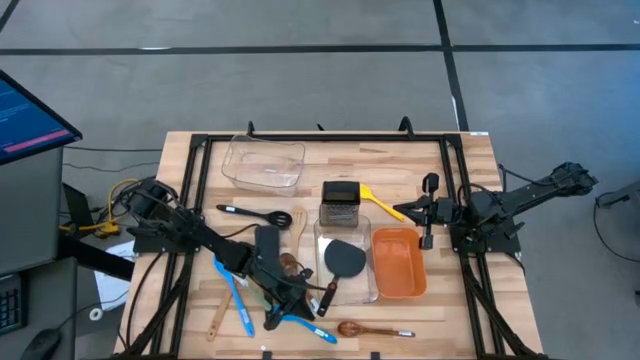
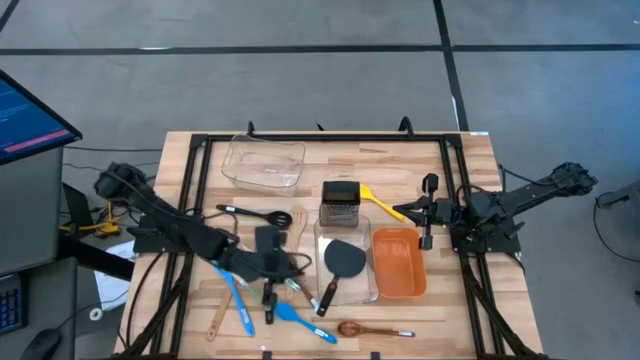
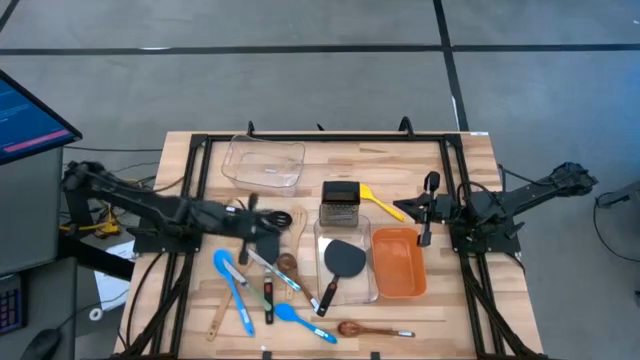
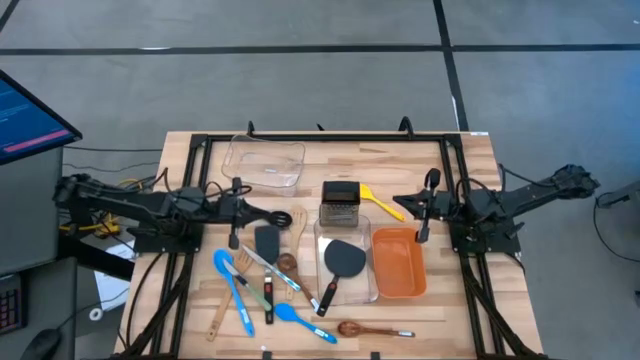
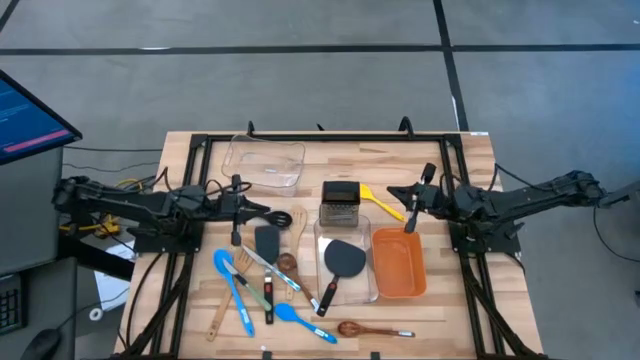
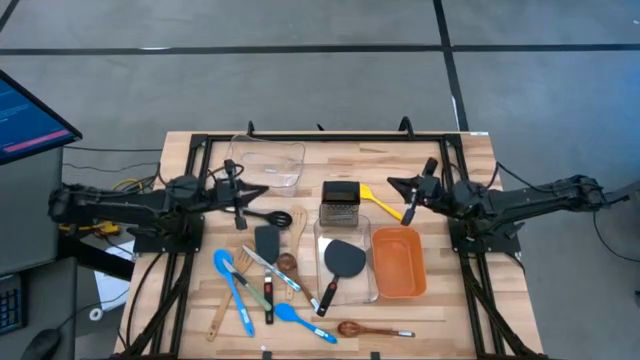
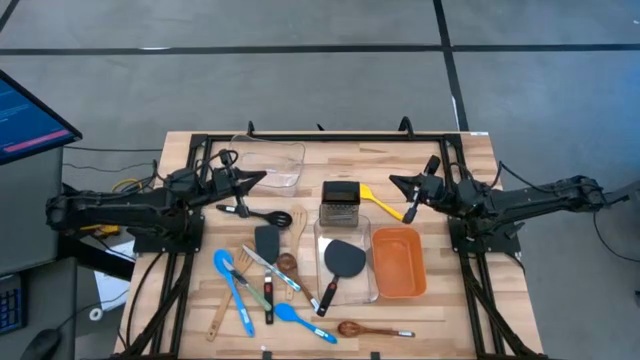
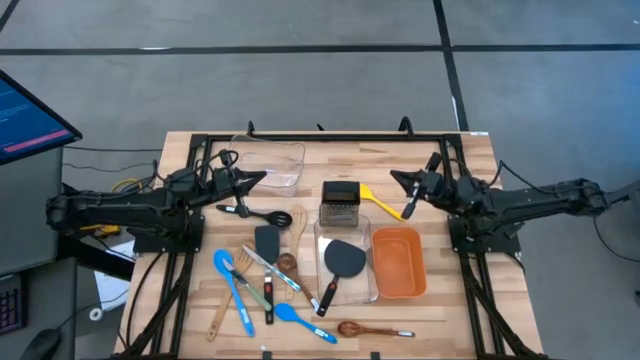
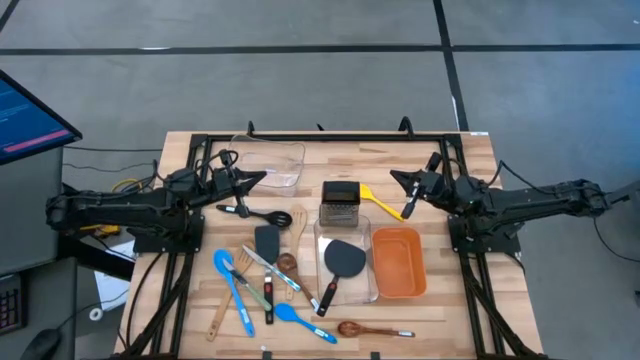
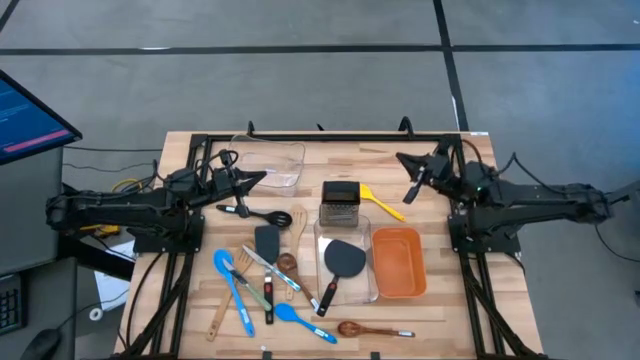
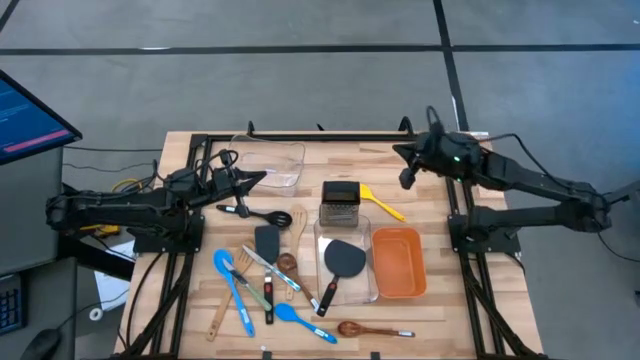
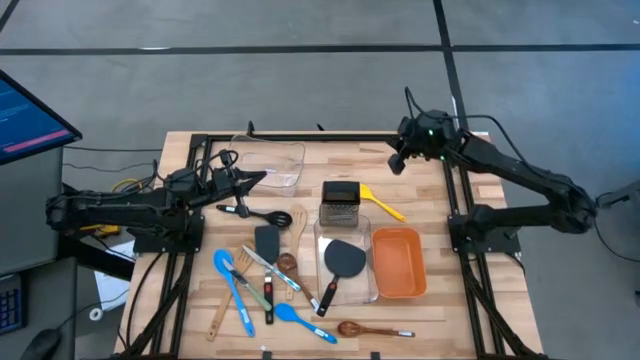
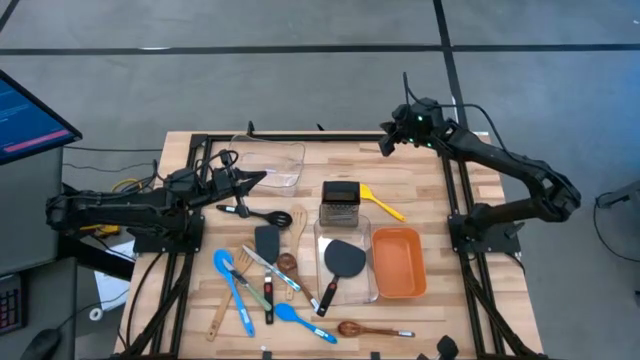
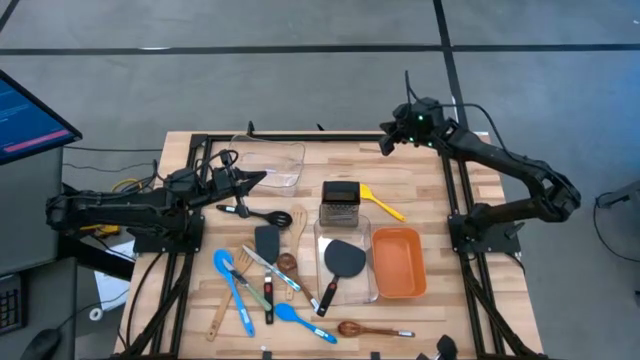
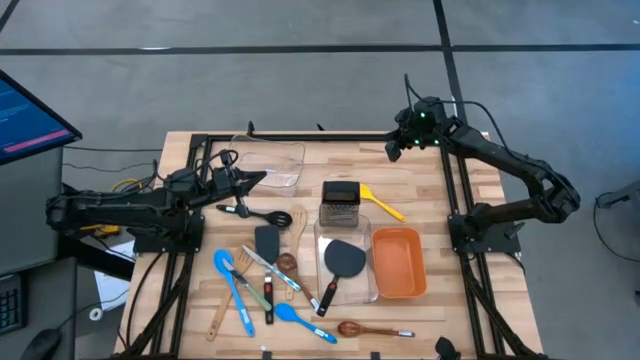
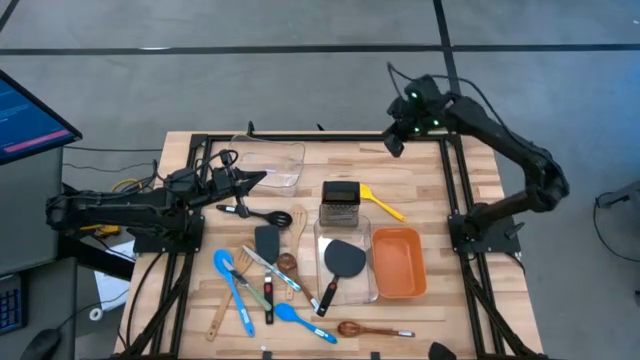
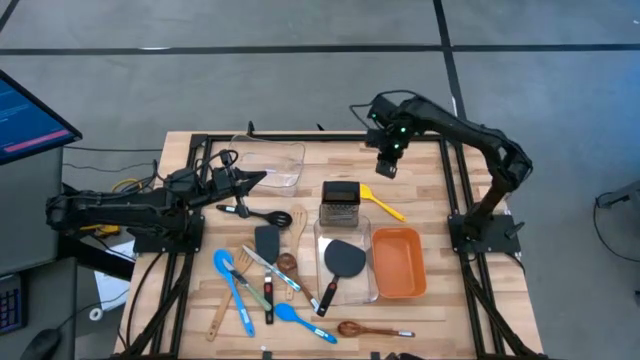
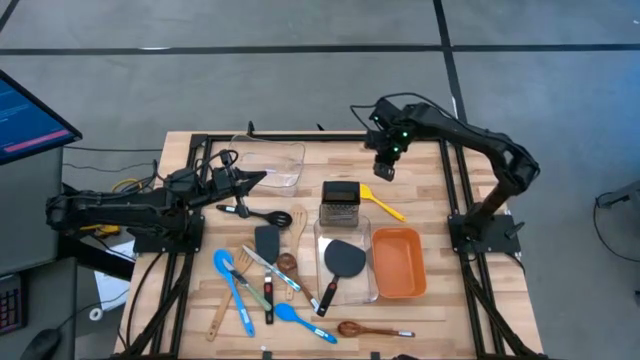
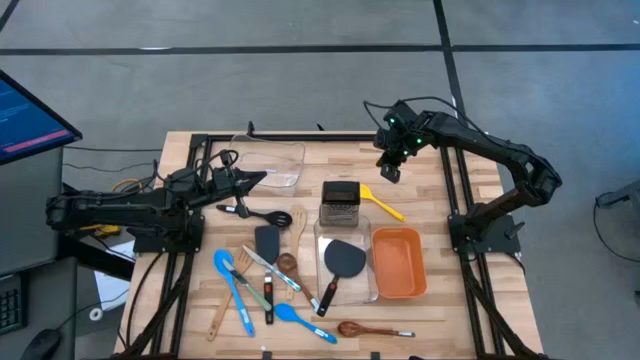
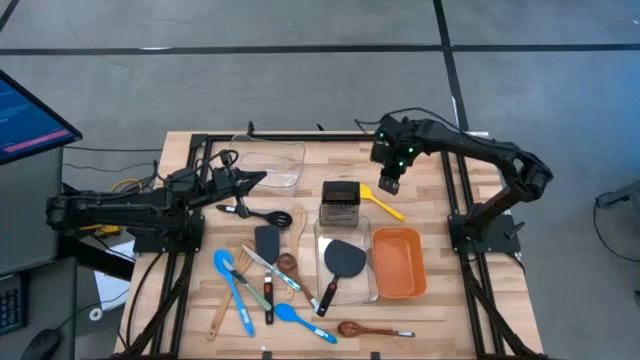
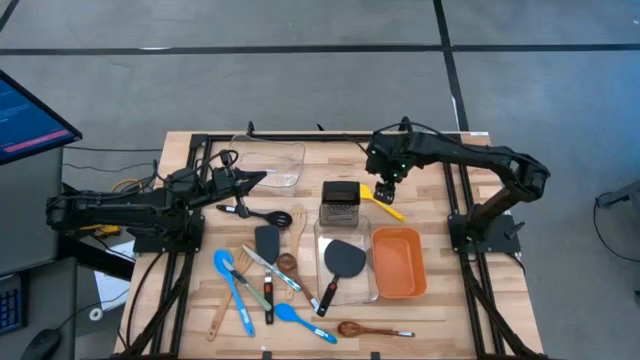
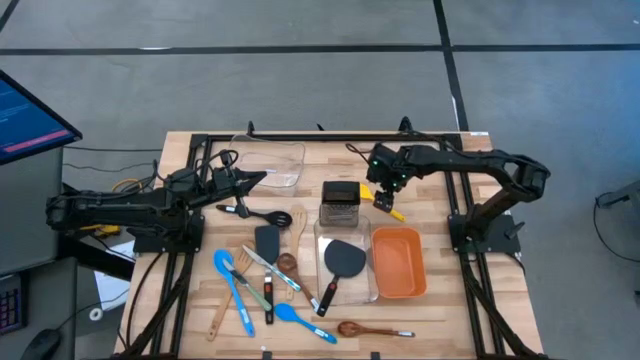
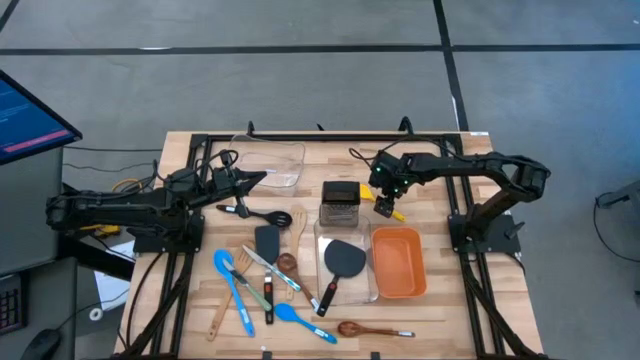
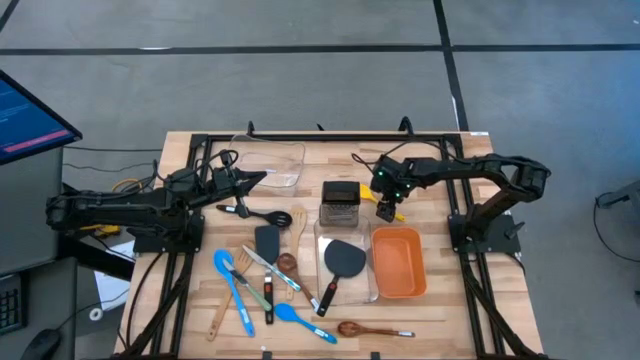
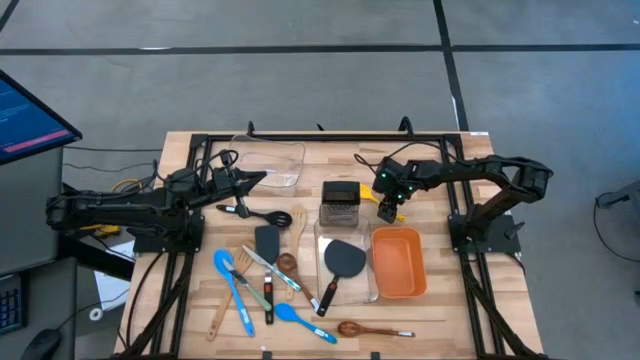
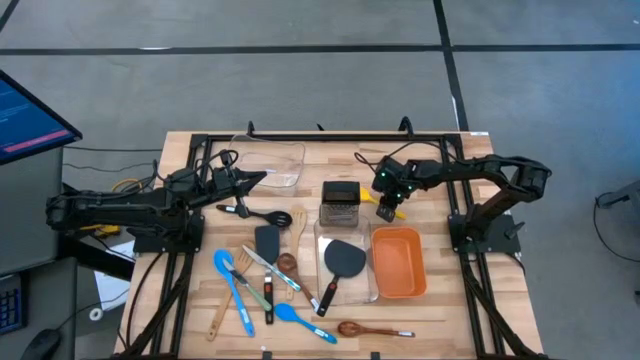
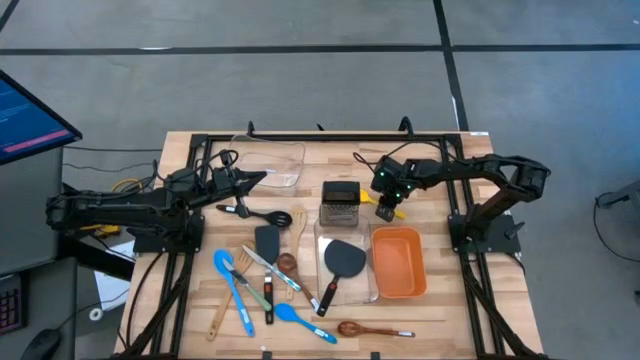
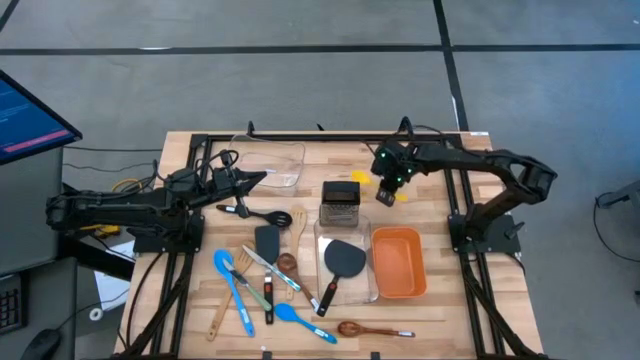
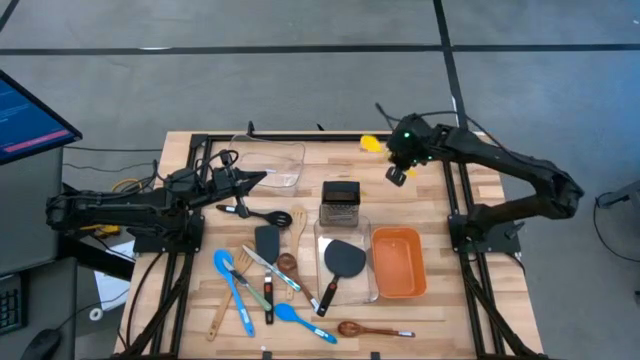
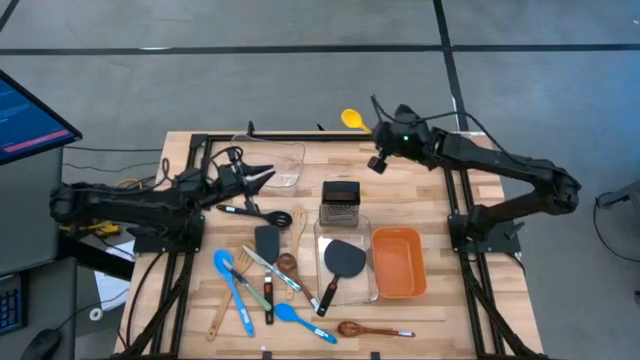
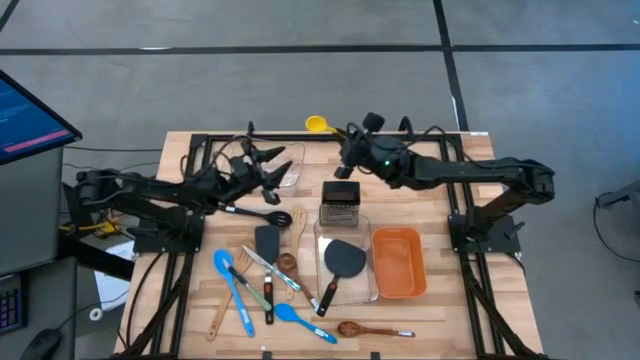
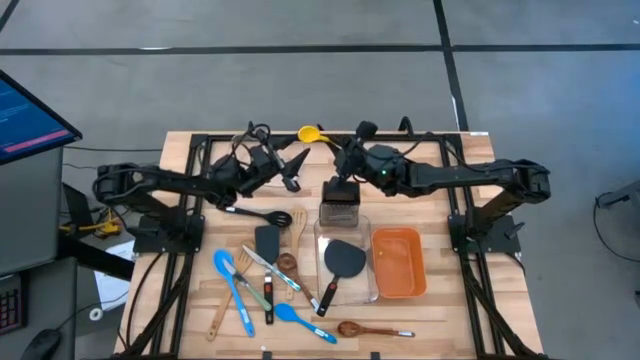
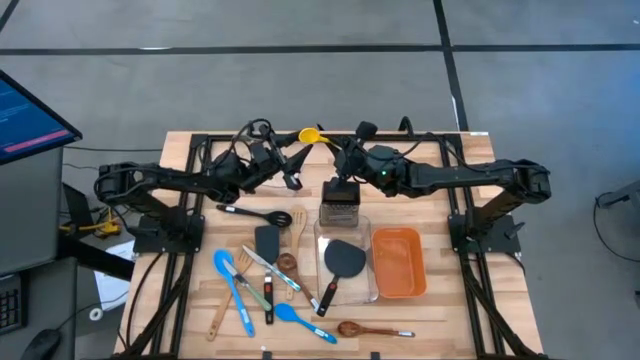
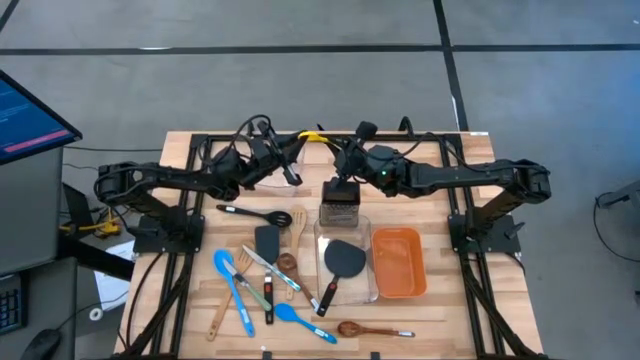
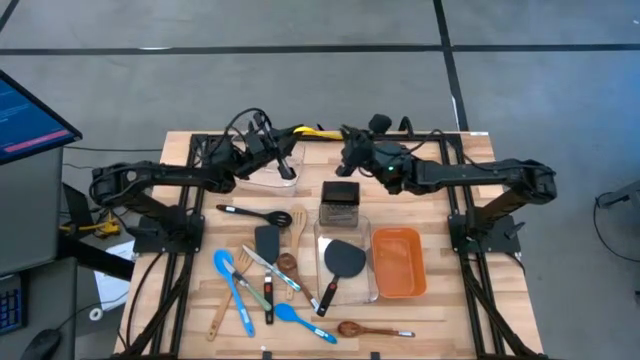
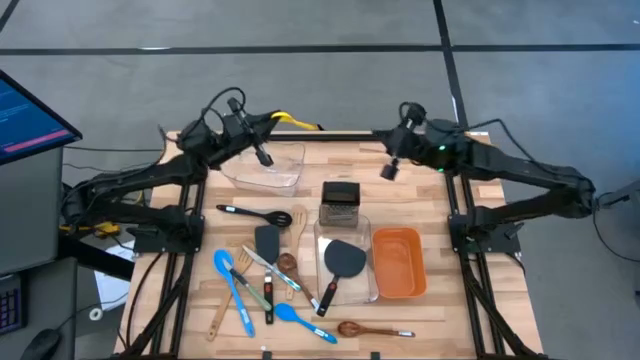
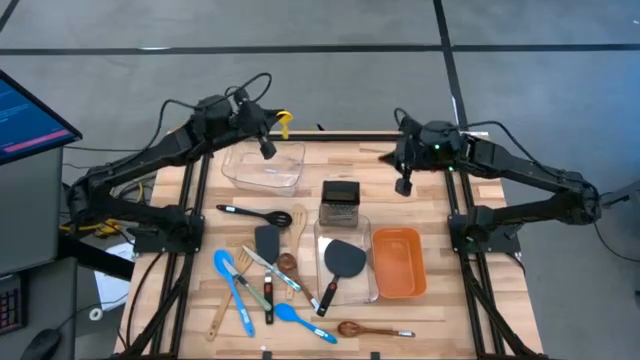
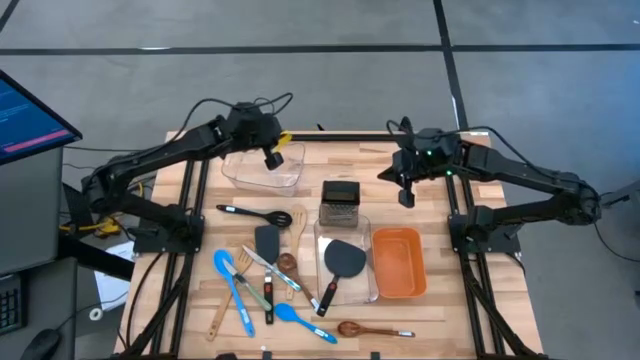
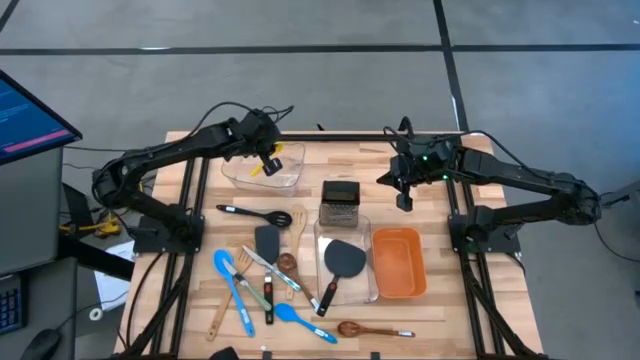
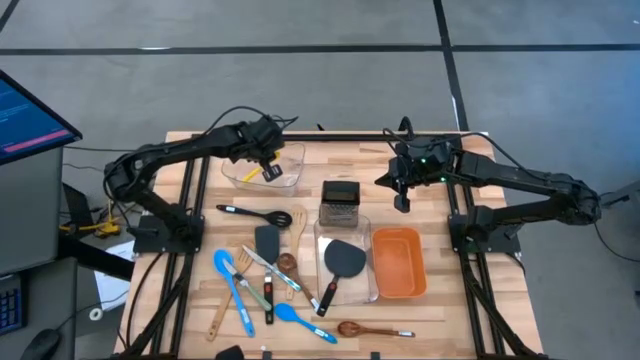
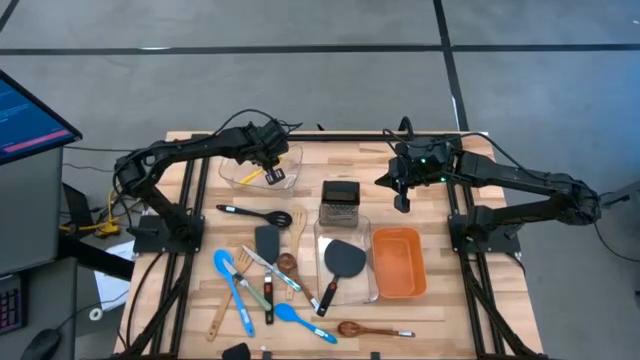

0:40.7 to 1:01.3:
Task: Pick & Place Kitchen Items
Put the yellow ladle into the top transparent bin

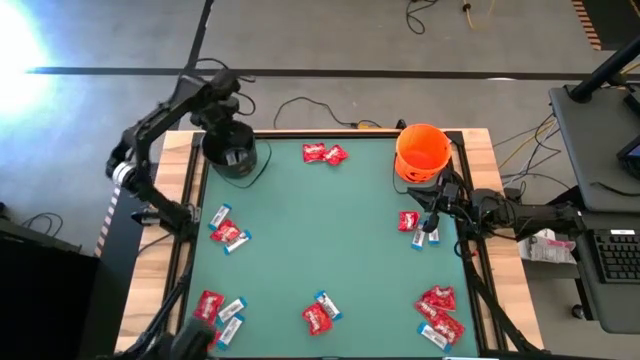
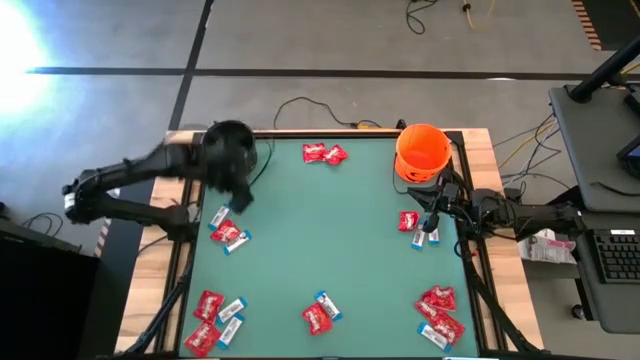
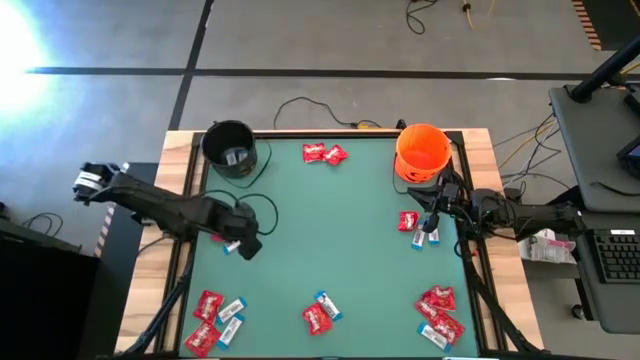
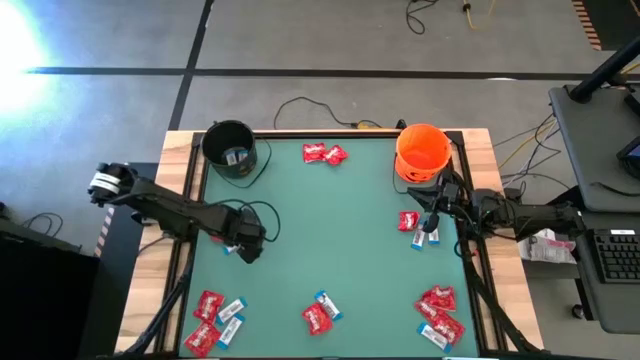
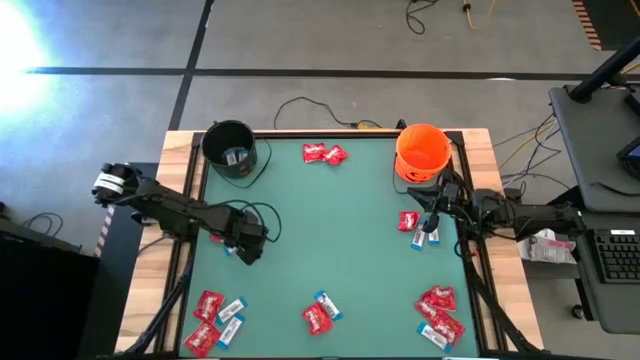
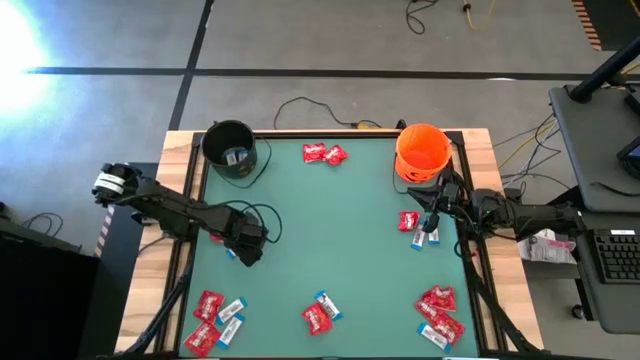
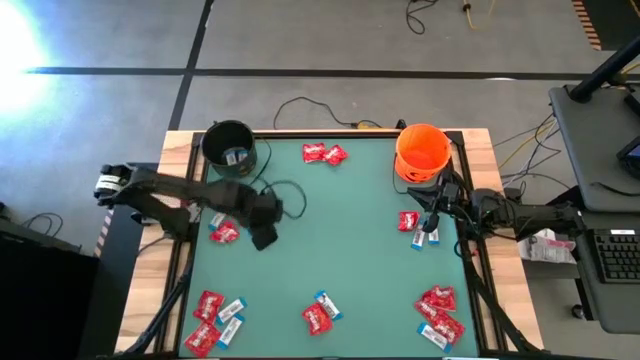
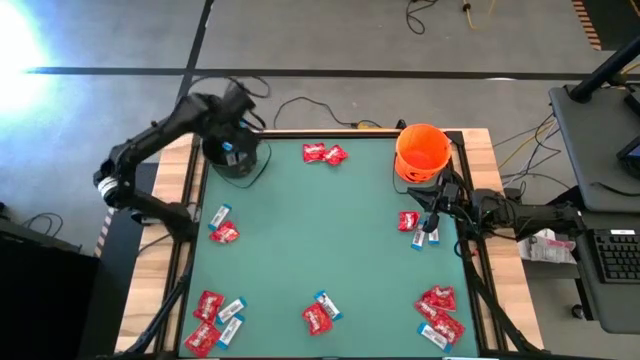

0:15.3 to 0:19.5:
Task: Sort candy by brand, put in halloween buckets
Put the white chocolate into the black basket
